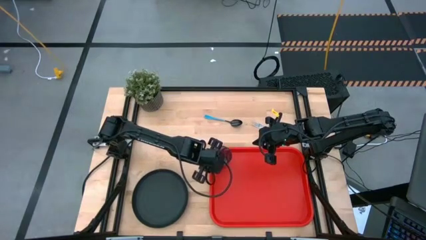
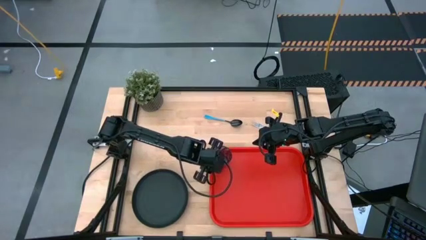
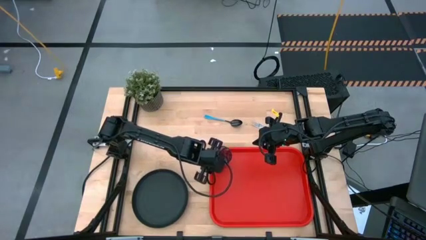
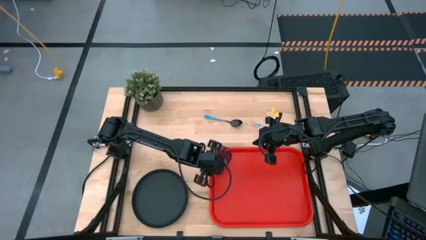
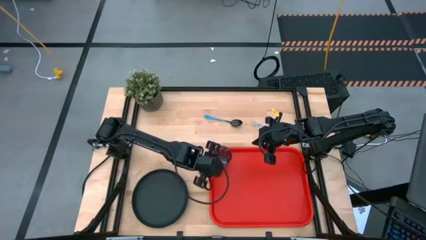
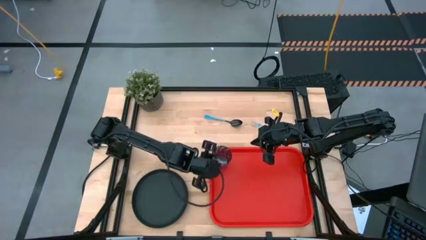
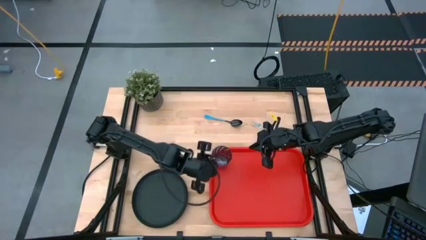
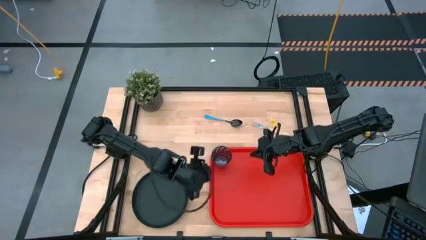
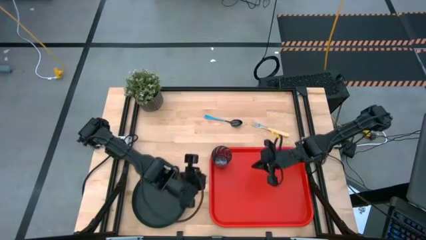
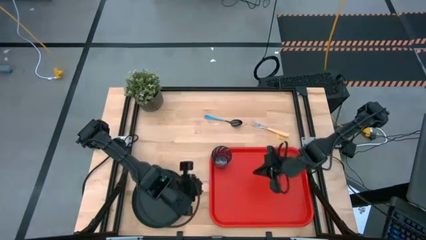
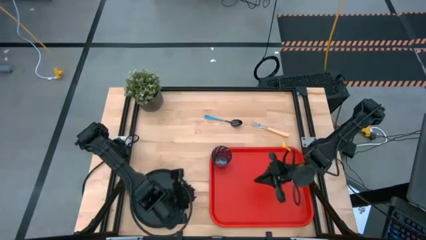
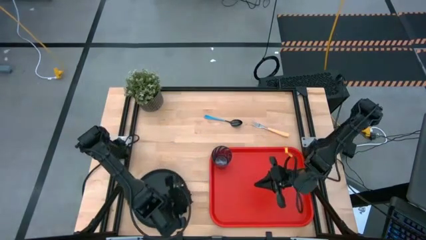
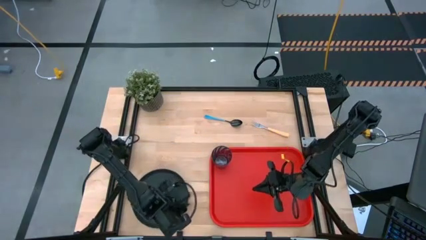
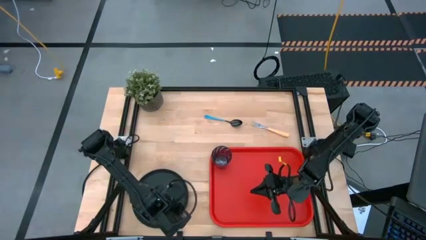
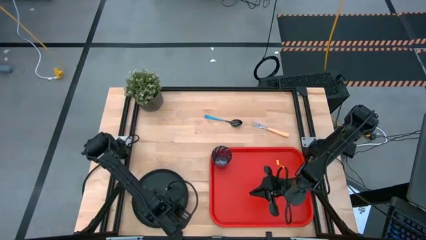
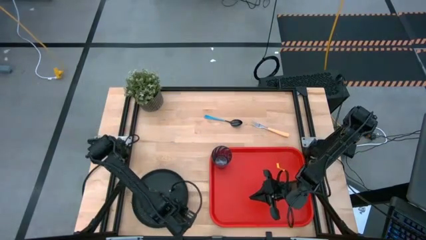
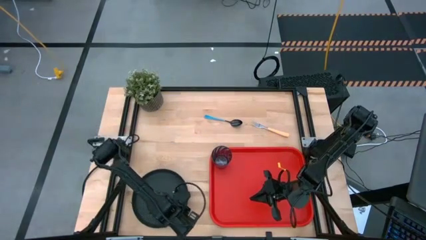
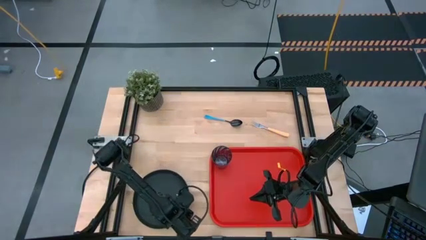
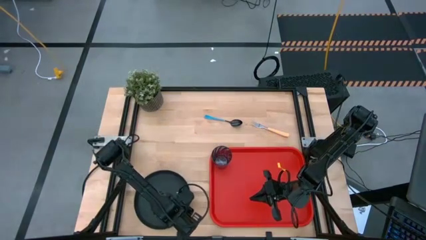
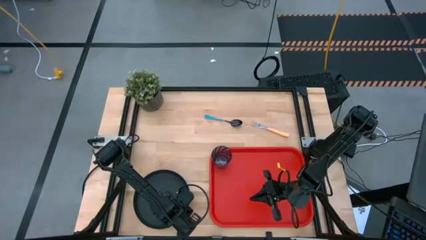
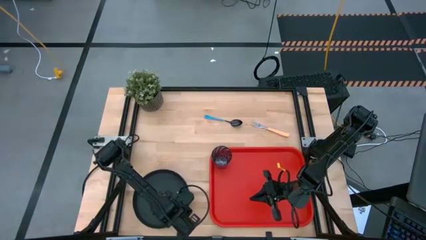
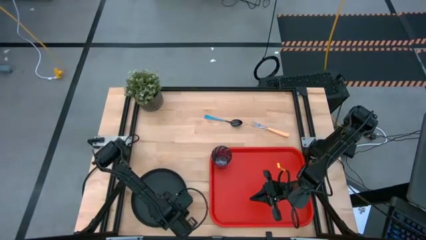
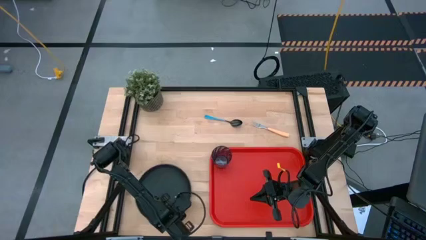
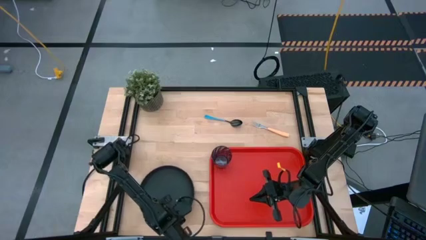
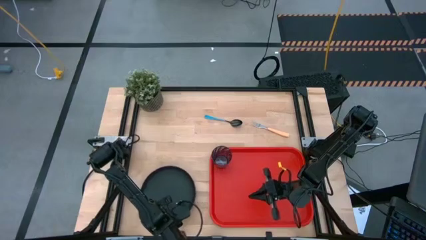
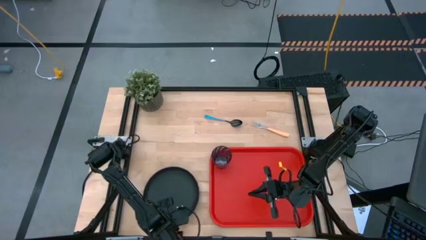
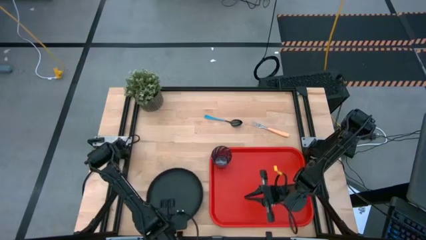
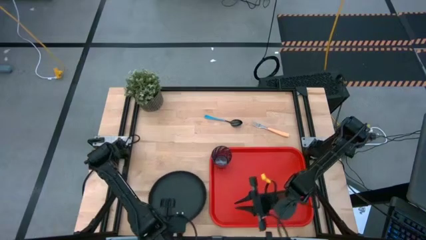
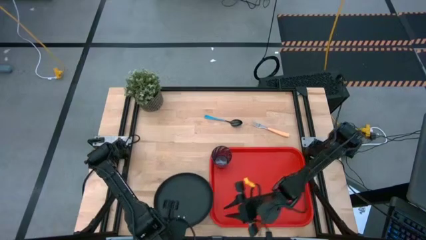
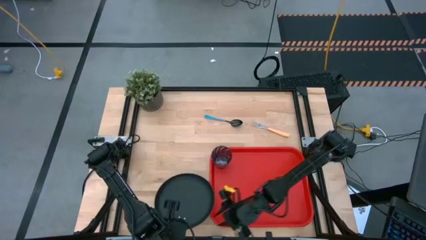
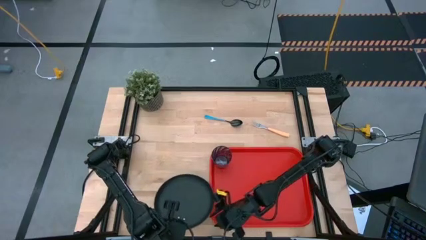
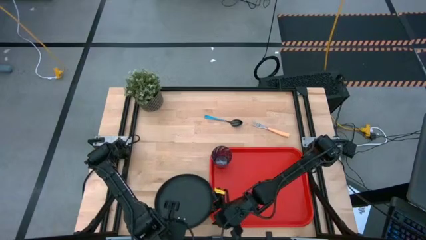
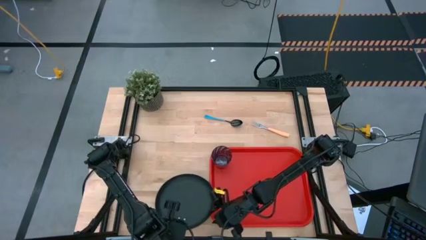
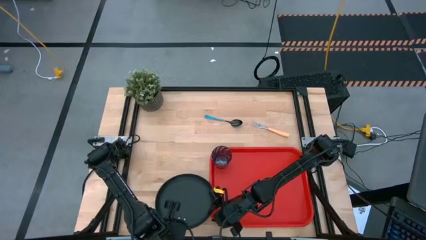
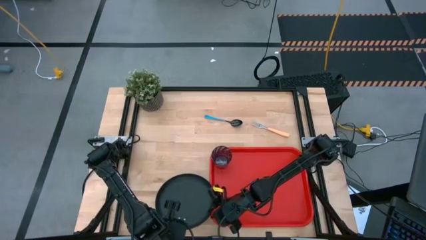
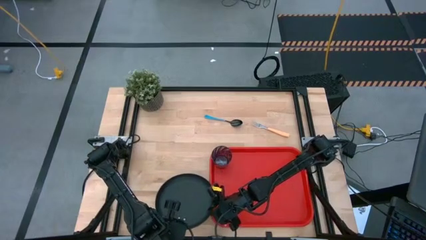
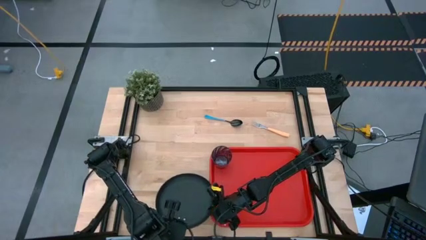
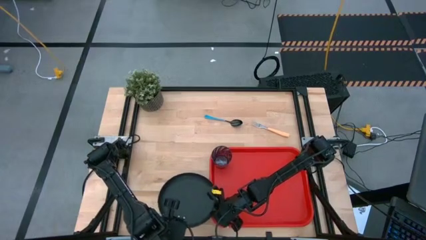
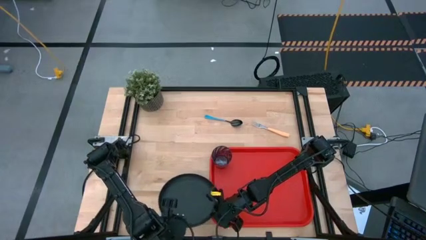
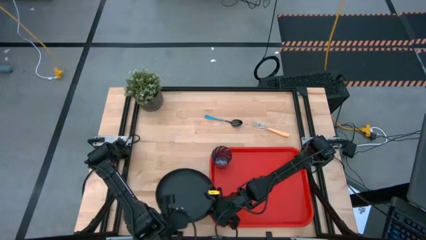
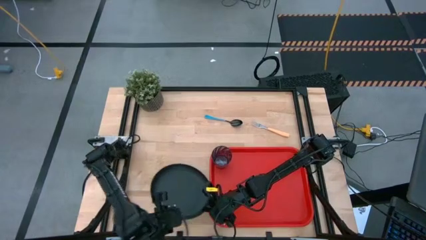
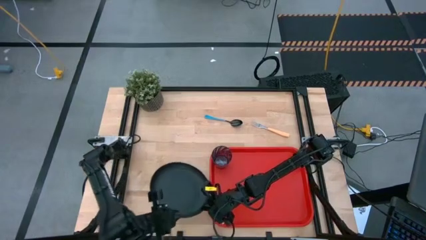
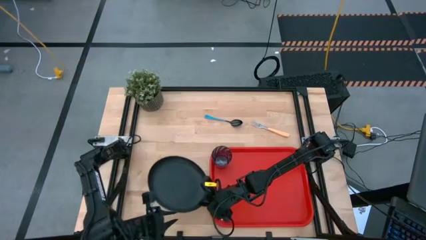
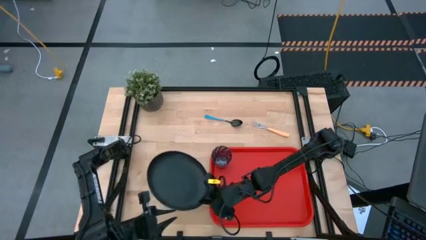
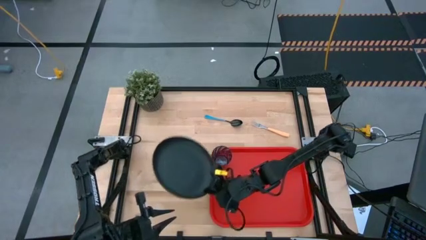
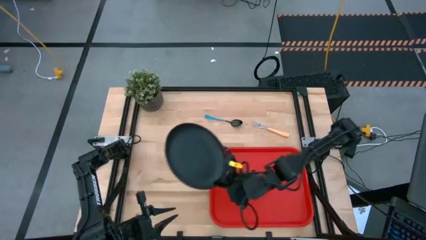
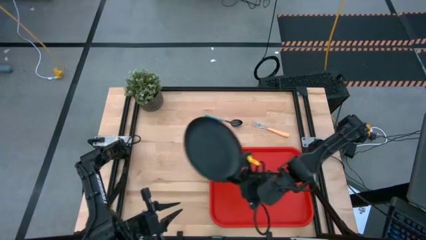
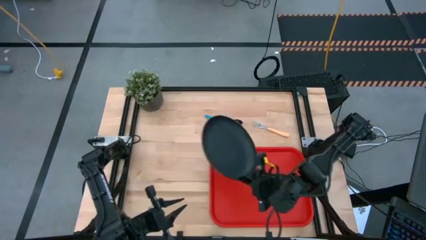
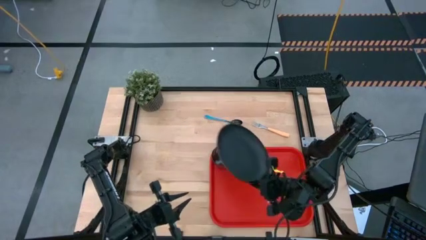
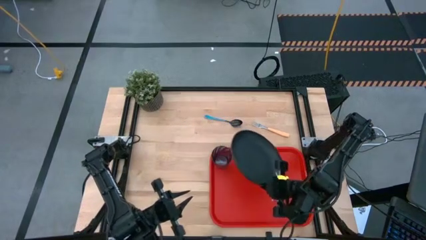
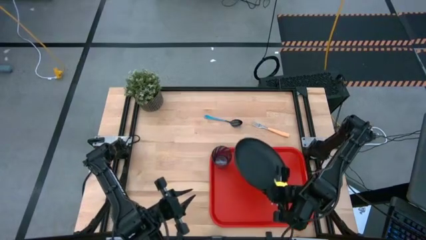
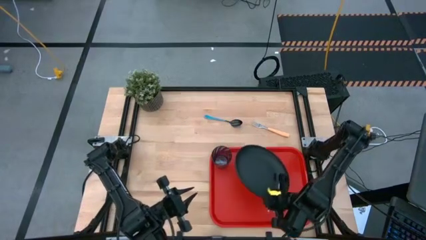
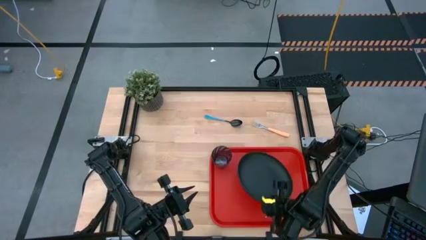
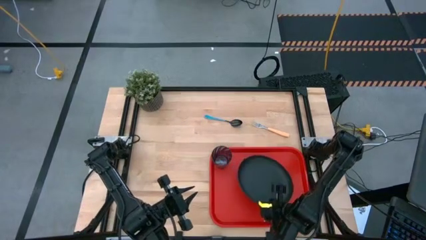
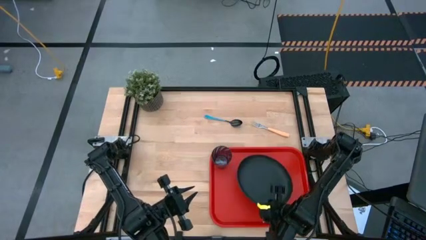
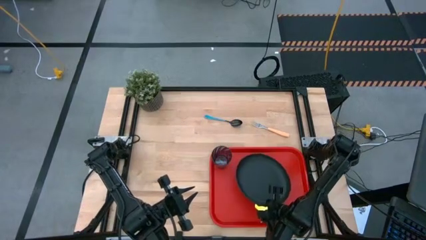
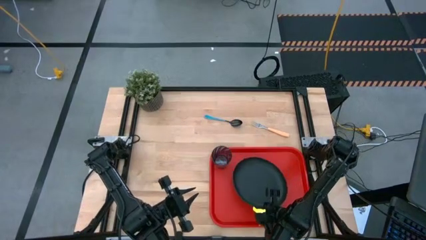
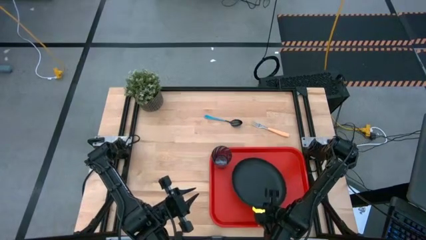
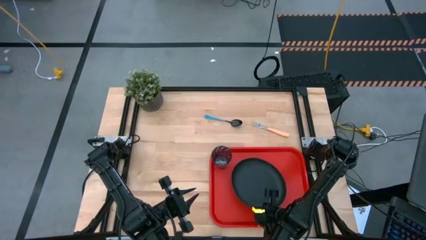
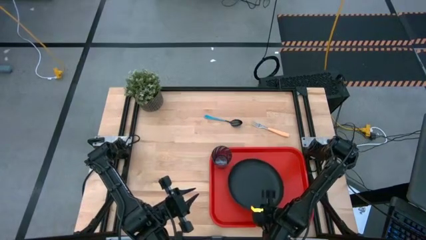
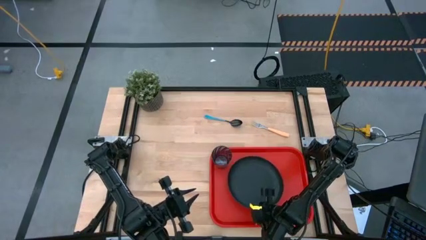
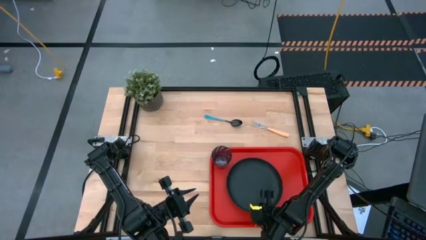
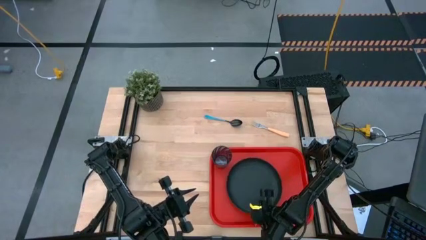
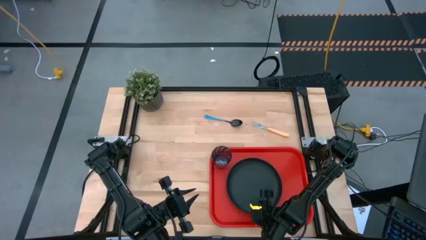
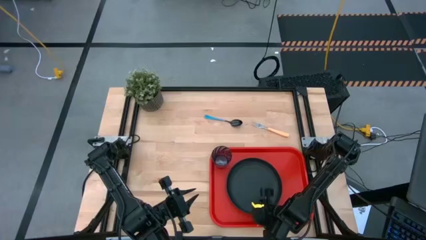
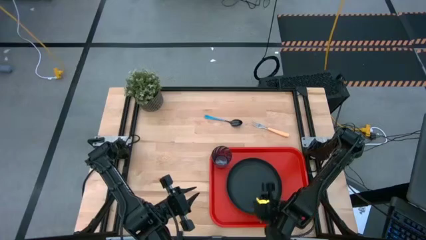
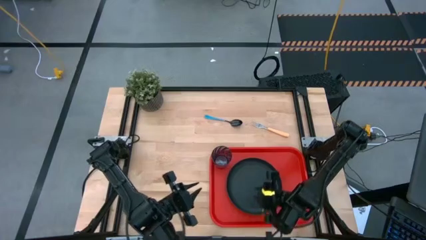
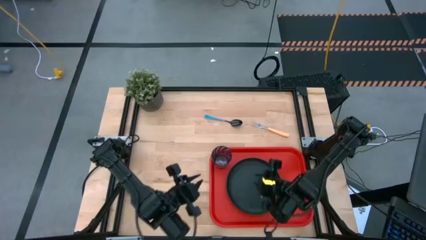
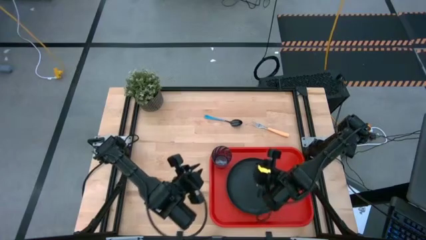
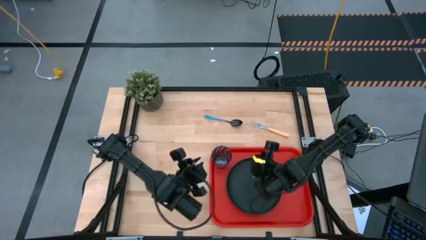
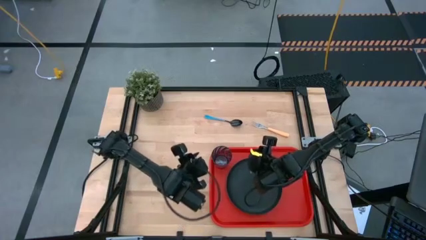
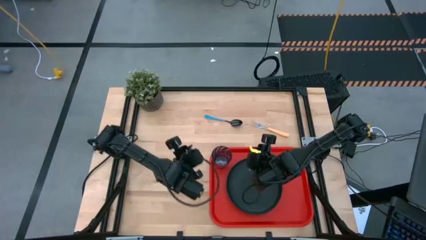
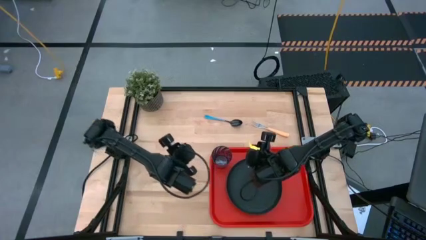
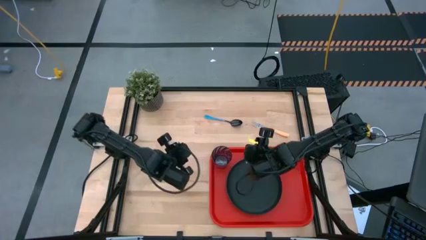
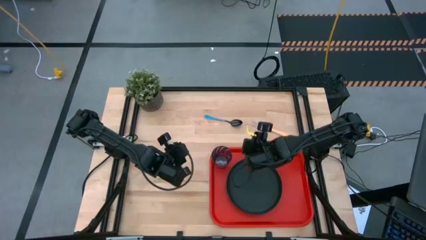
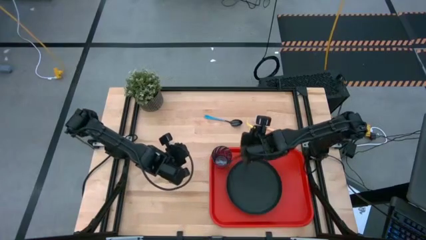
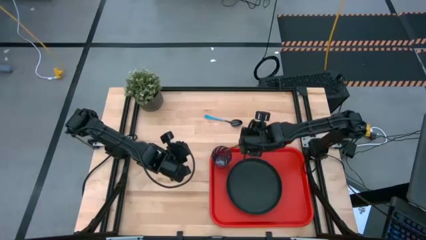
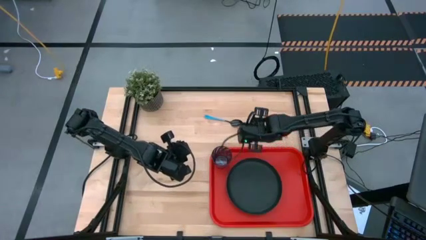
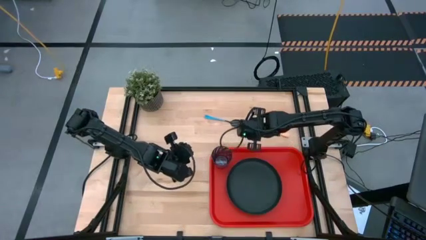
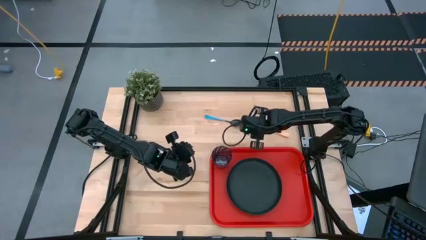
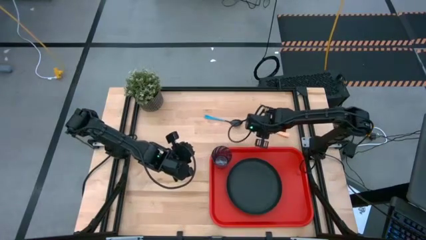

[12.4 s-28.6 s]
Task: Pick and place plate/cup/fork/spoon on tray
Put the black plate on the tray
